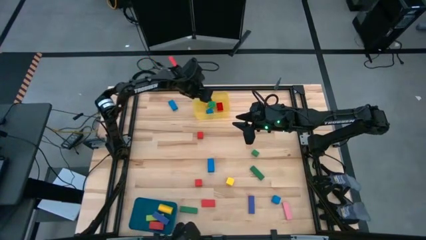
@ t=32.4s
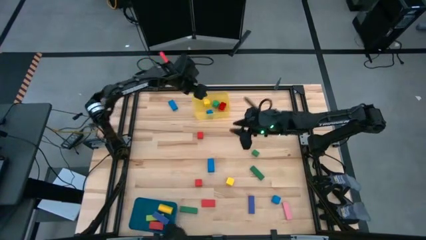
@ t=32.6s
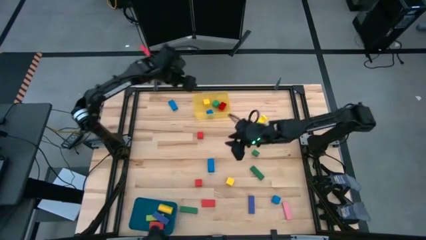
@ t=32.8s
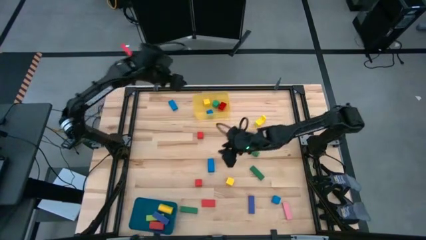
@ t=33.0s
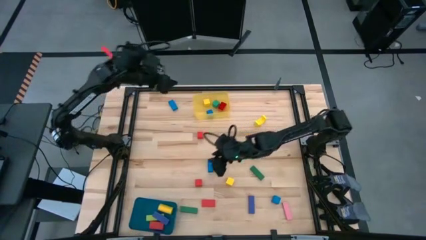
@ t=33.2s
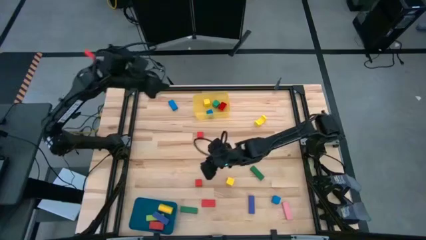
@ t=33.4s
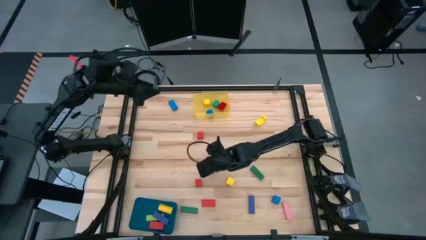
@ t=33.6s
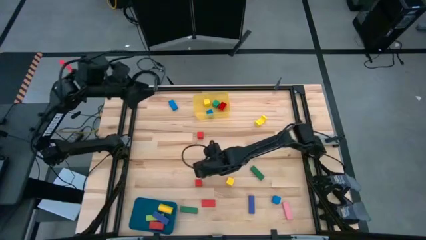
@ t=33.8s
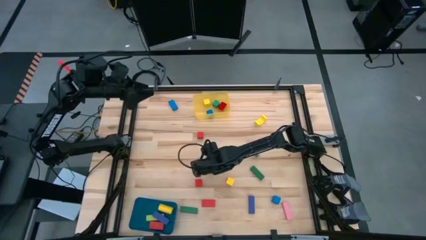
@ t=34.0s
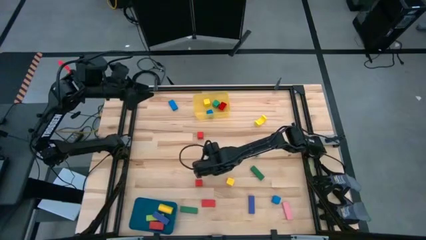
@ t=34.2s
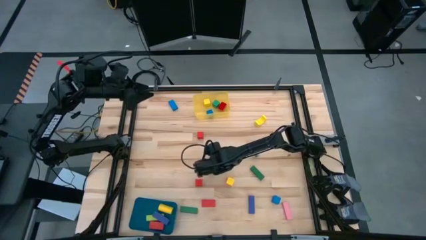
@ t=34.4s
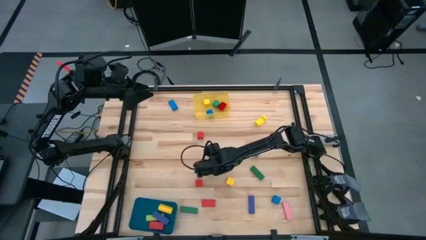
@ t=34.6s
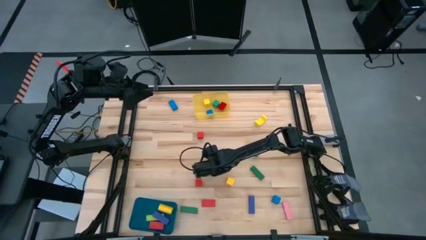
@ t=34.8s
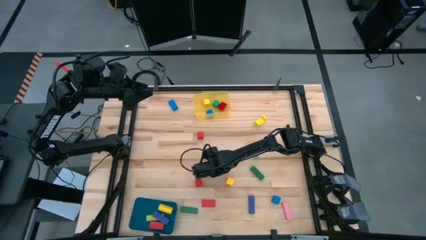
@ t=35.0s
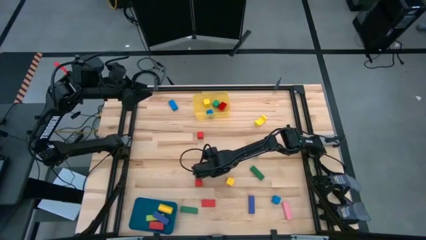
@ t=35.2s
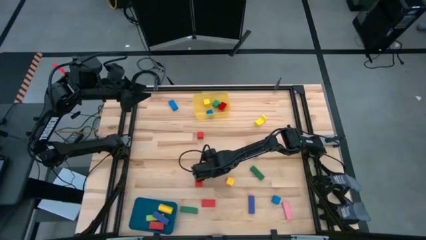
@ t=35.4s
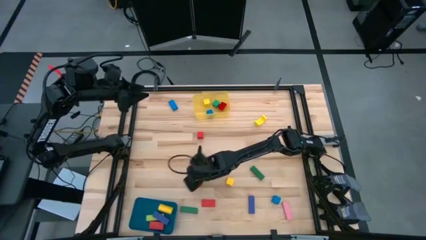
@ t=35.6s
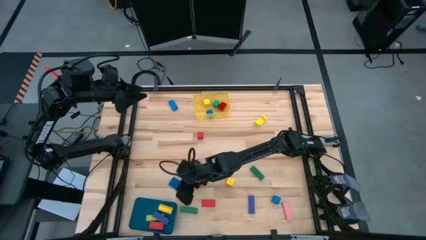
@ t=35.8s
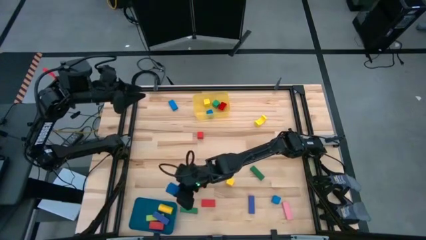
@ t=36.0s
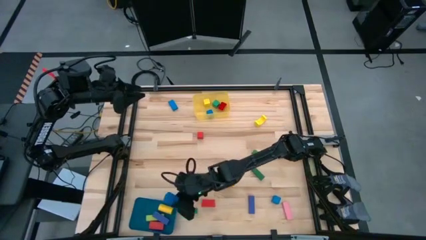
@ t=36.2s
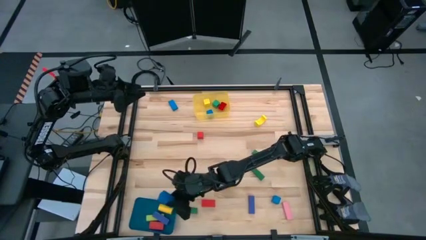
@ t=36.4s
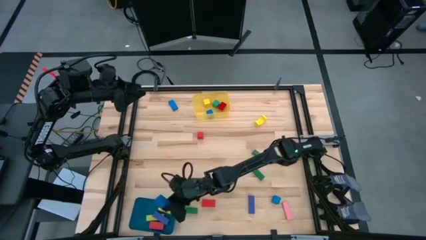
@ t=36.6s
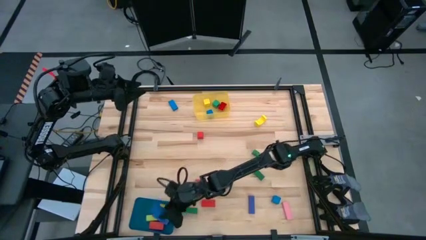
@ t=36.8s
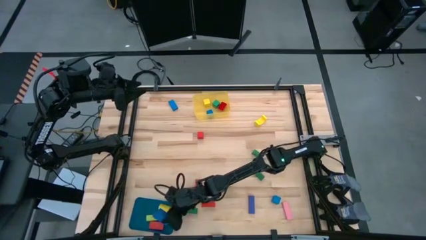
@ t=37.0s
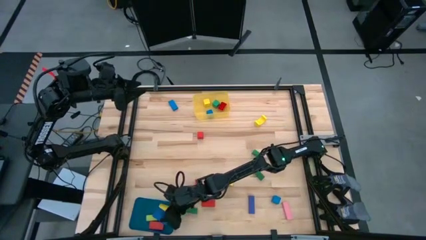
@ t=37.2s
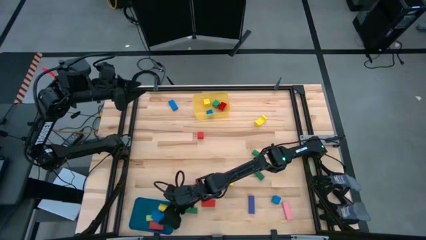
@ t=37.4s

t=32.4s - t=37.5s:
Task: Sort blocks by size
Put the bottom blue rectangular block into the blue bin

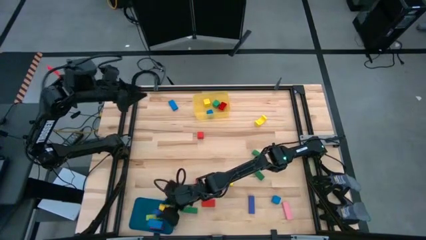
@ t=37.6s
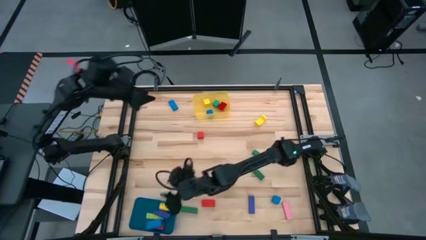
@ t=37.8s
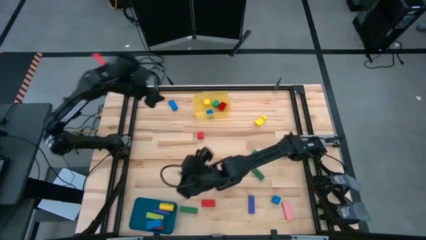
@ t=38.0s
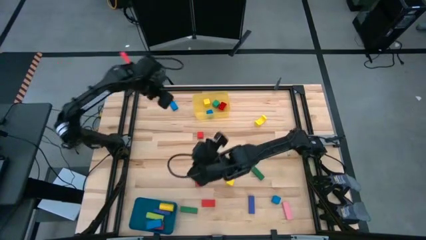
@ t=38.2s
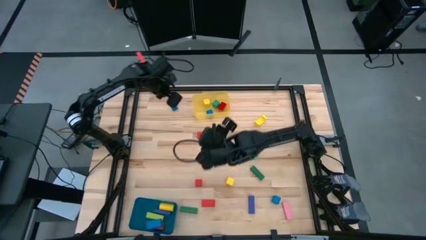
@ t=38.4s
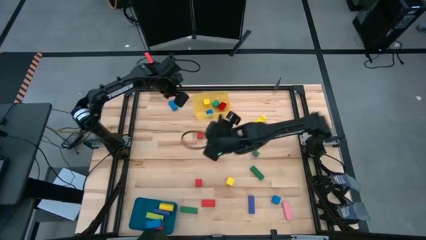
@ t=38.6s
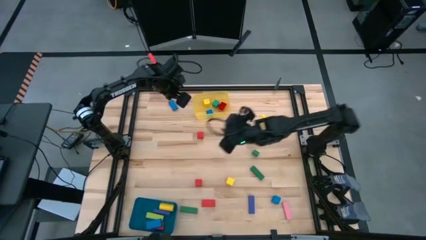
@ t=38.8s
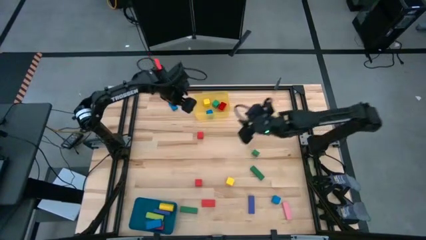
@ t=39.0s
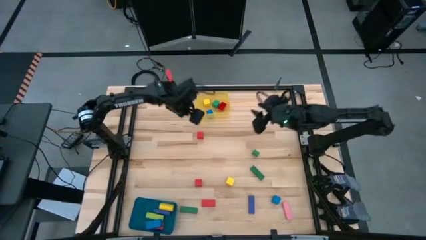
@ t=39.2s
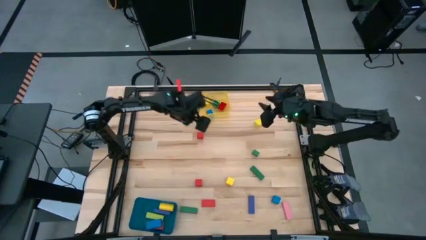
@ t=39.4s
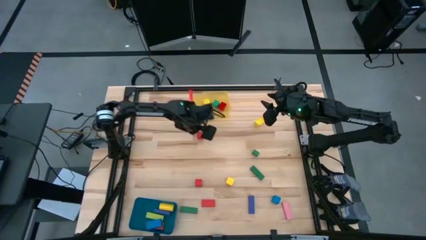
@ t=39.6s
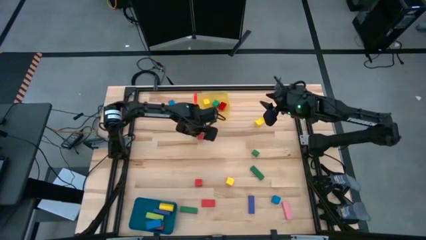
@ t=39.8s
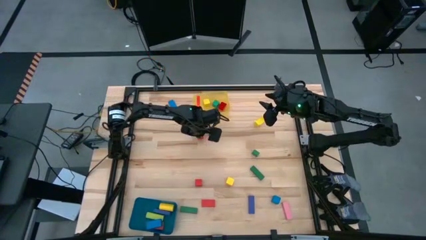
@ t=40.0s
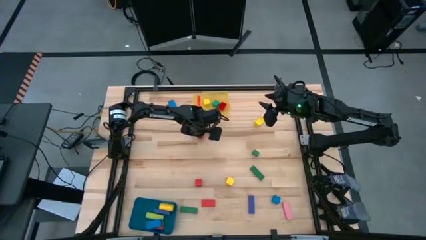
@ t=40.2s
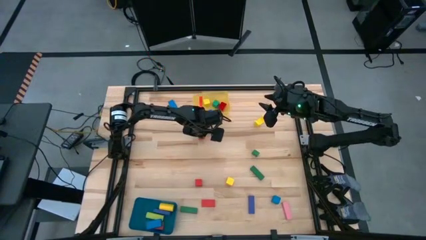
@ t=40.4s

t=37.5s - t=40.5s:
Put the red square block into the yellow bin

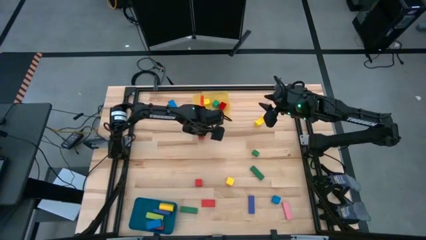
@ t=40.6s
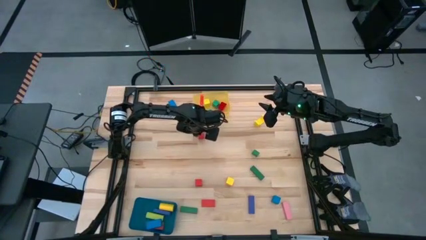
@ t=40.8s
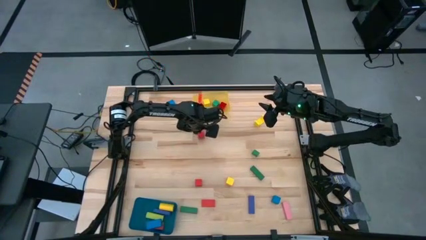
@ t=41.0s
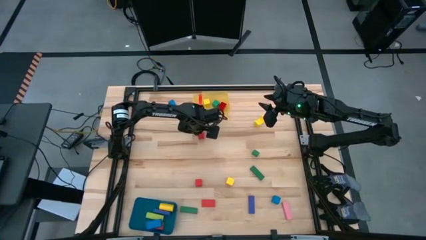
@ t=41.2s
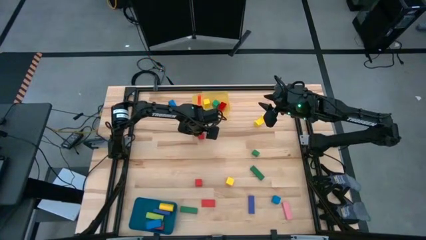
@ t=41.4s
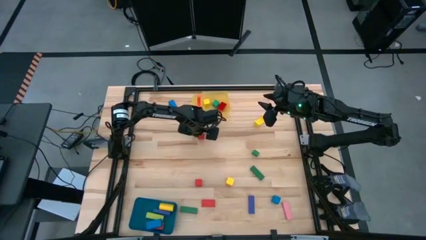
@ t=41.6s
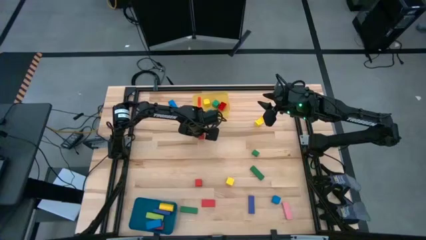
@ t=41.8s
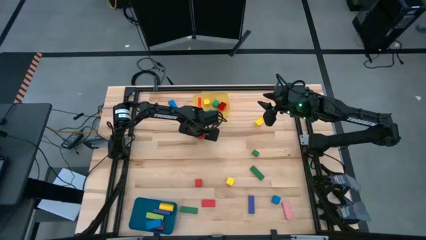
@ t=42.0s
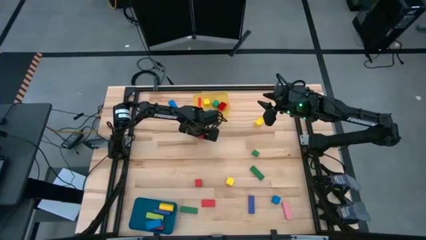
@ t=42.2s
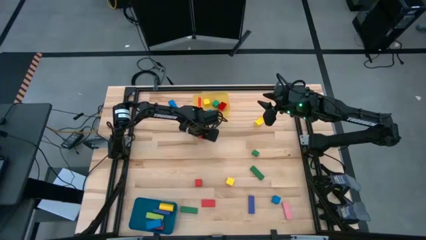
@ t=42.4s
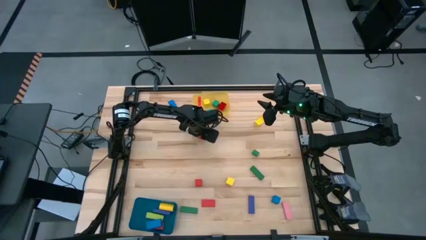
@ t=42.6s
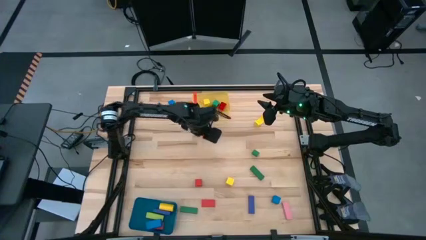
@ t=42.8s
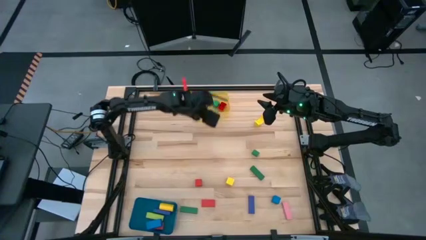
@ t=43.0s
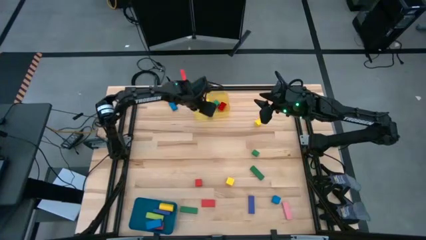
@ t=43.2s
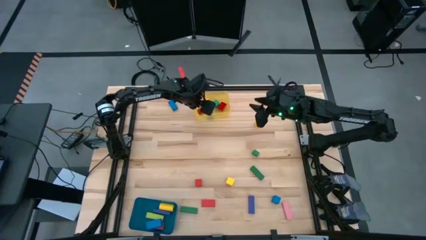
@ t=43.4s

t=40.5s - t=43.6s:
Put the red square block into the yellow bin

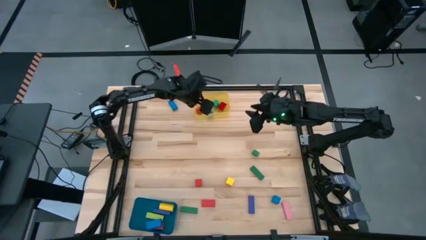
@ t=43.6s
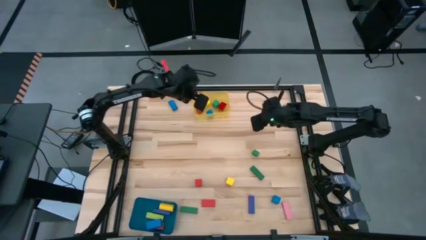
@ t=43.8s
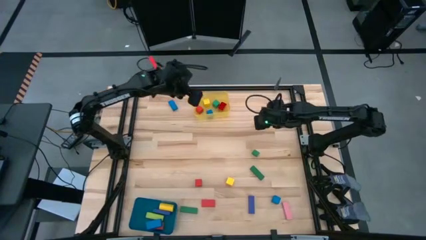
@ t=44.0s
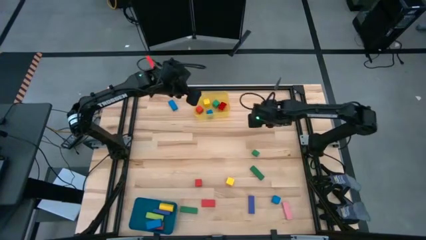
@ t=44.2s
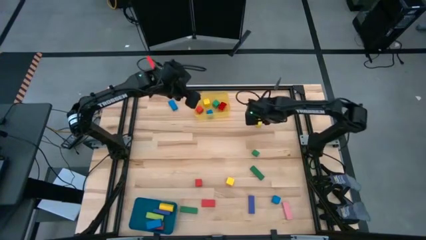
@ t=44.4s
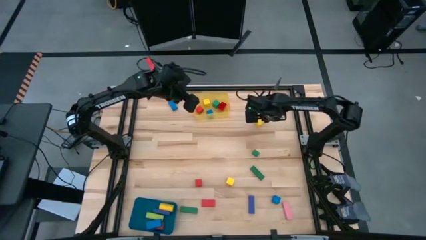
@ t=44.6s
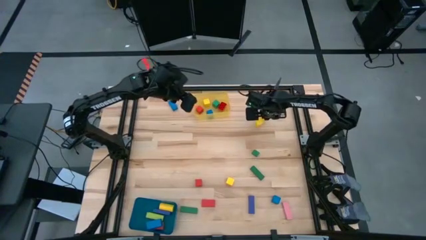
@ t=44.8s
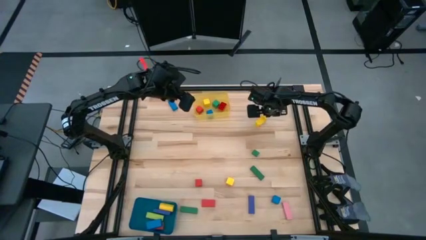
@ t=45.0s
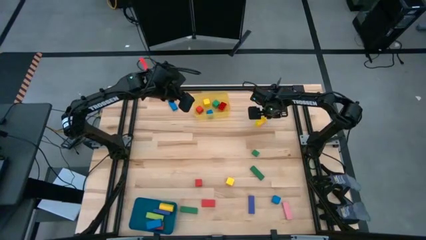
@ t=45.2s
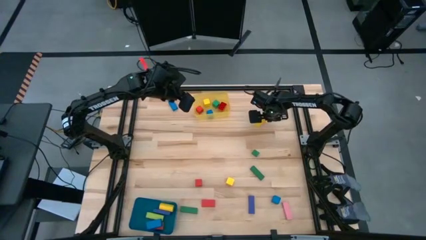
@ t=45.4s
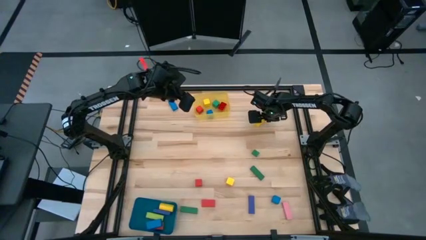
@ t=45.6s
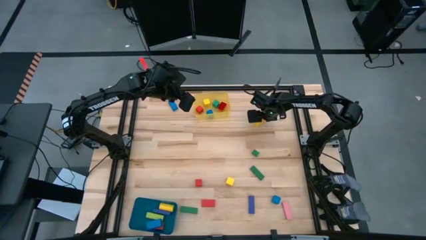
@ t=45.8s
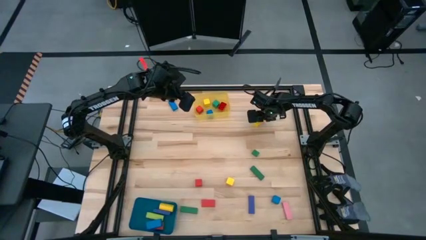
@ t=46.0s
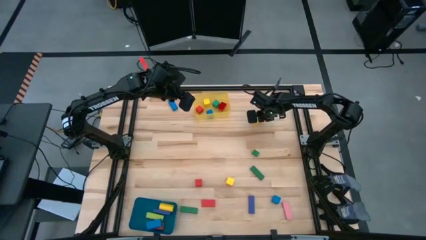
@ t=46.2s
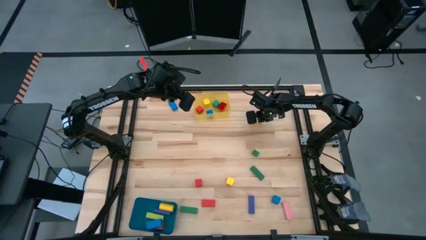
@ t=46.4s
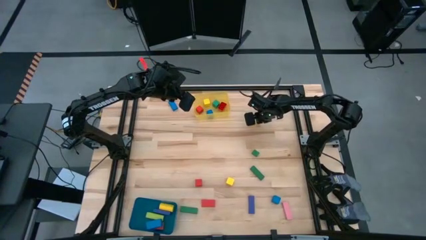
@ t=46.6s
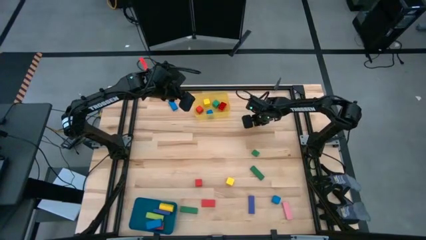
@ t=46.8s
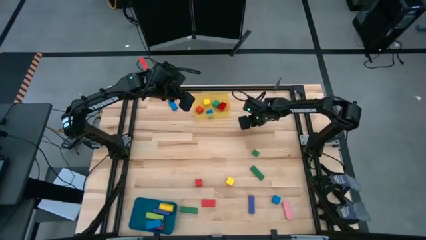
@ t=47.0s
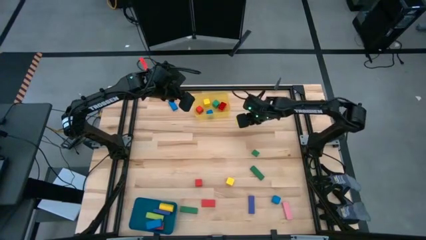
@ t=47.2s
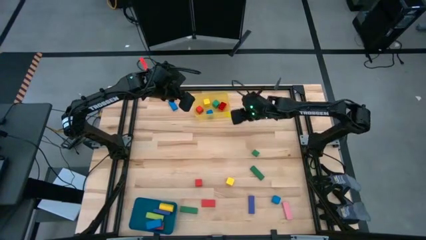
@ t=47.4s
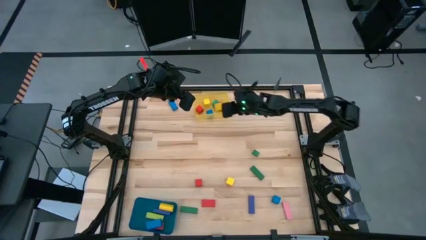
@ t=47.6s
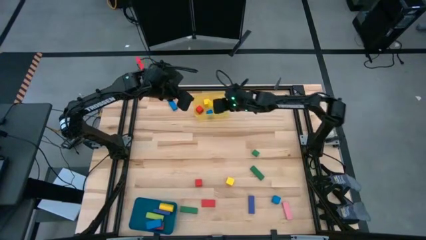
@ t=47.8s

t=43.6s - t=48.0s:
Put the yellow arch into the yellow bin
